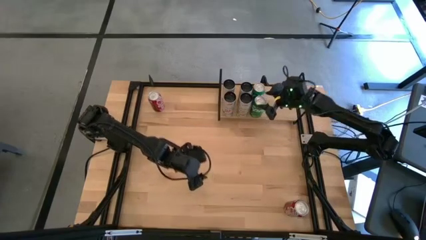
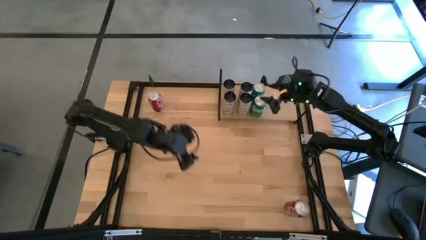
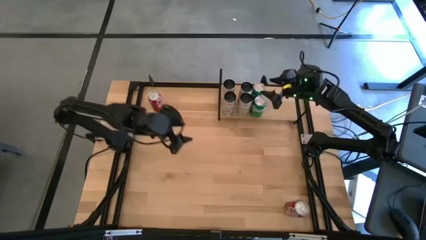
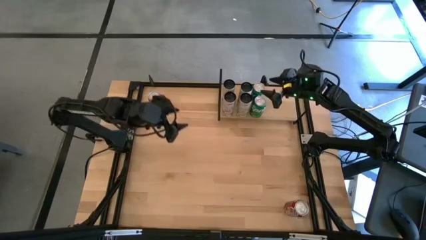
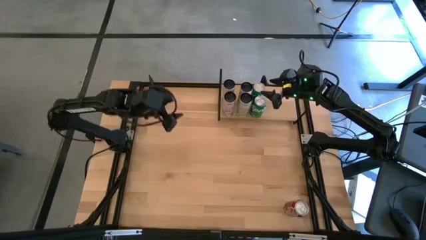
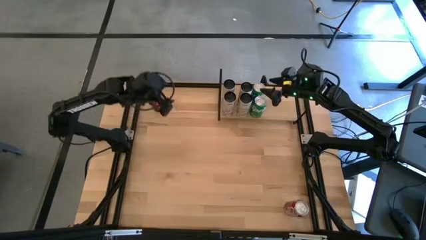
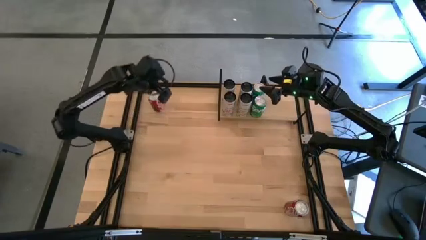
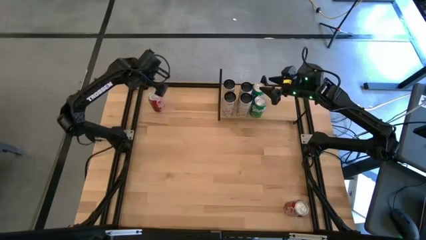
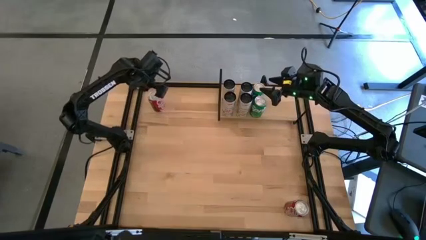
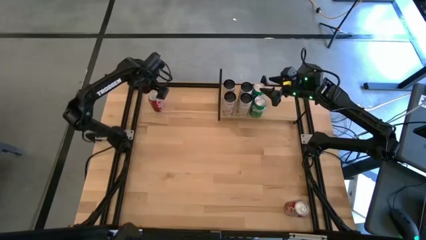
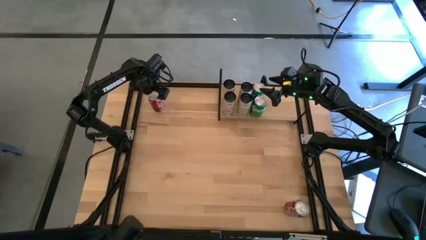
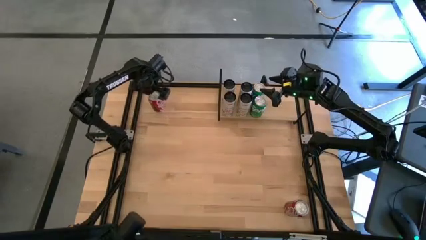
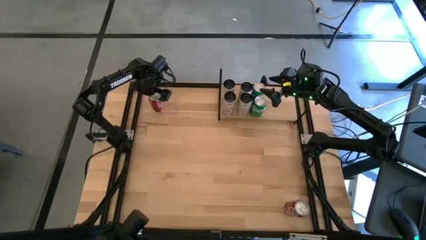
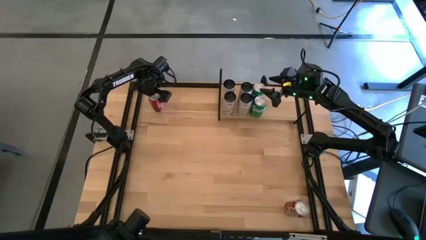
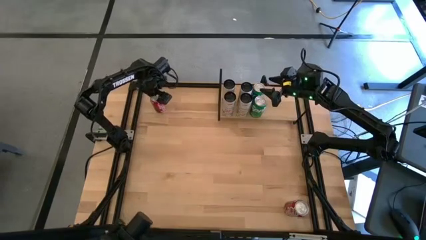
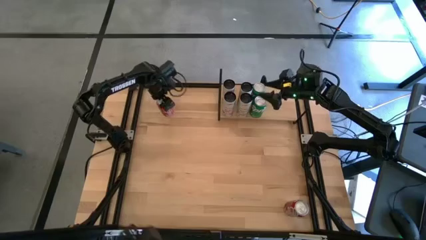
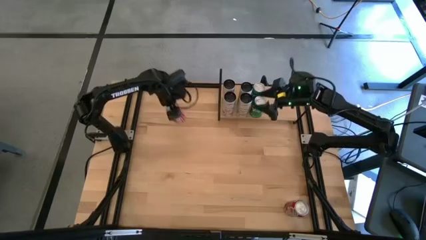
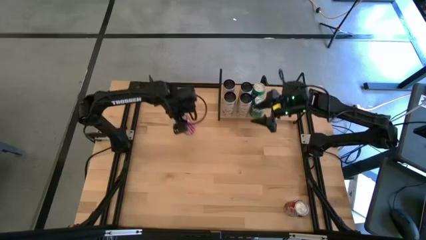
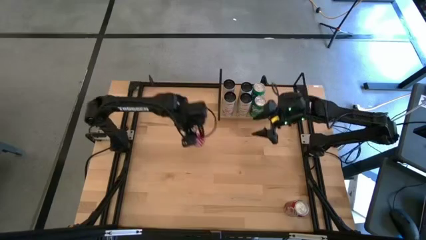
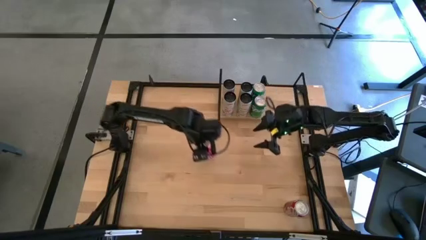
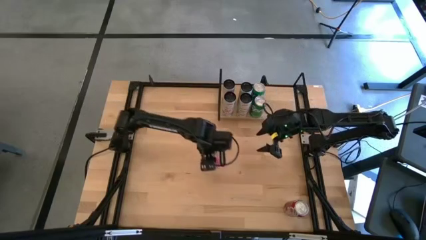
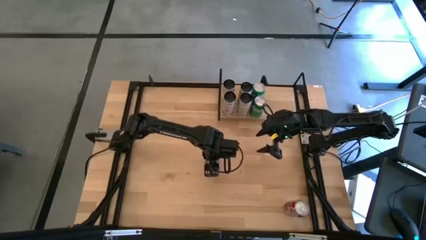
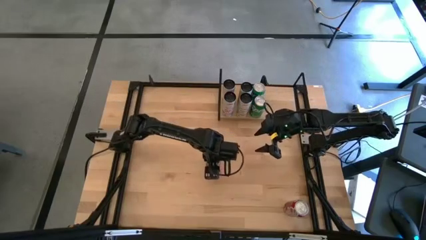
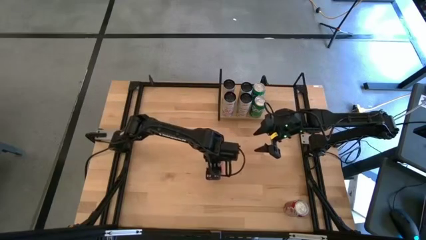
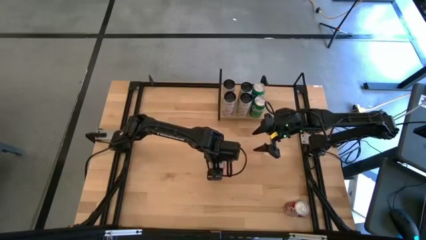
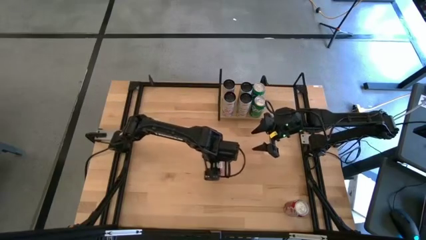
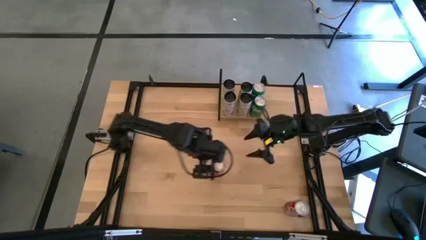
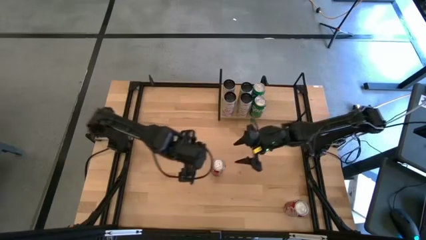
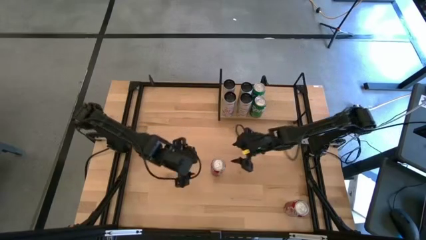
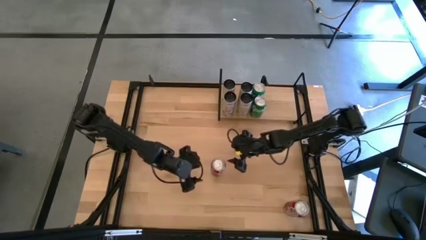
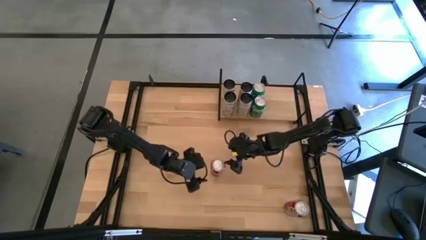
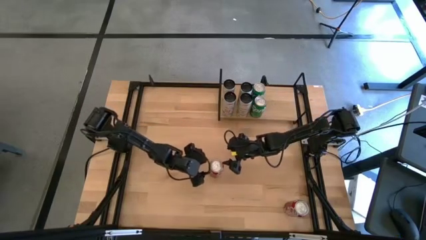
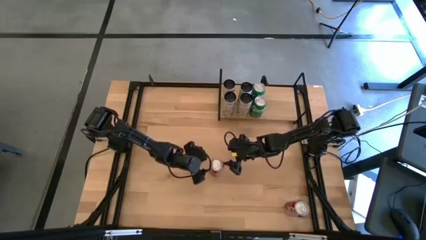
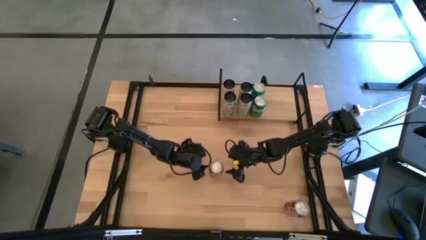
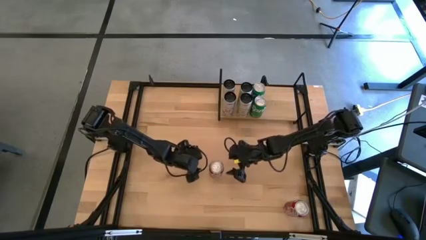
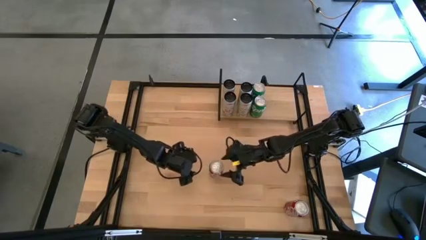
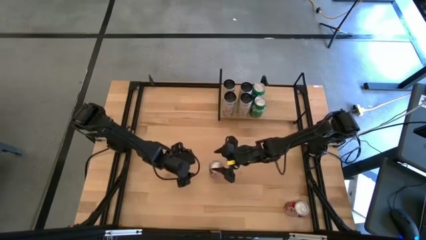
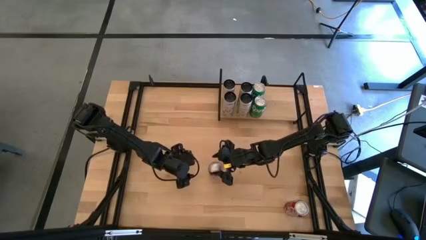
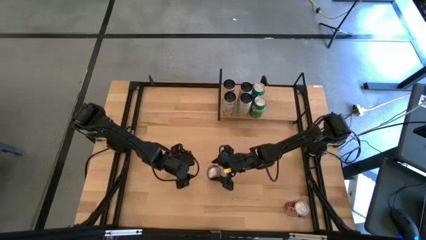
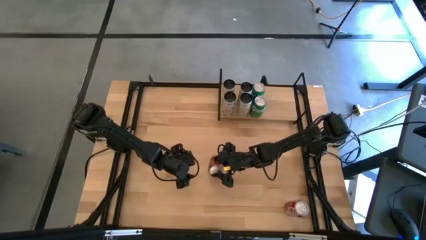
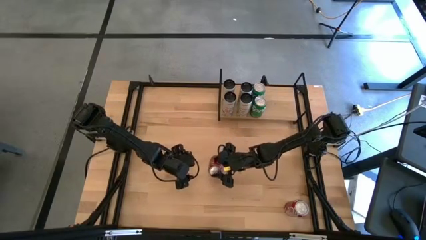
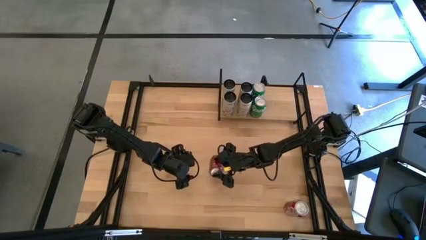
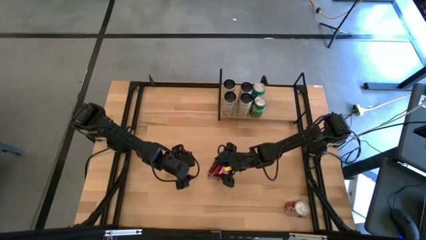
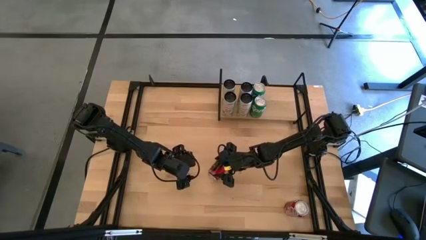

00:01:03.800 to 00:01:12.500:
Task: Place canned beverage on shelf
Put the top red-white soda can on the shelf

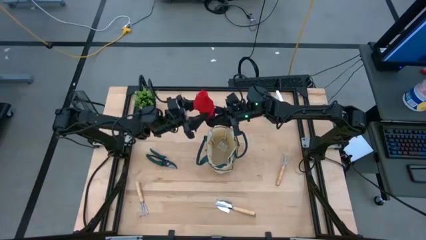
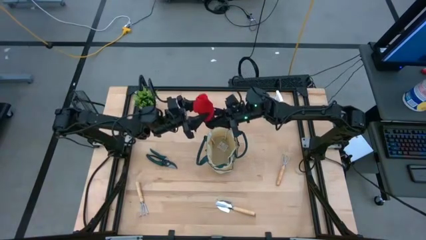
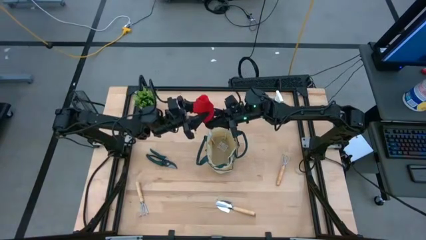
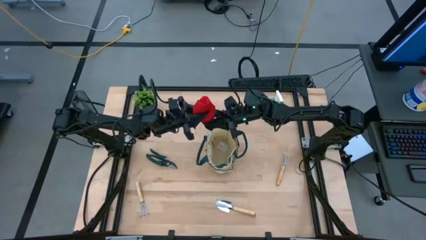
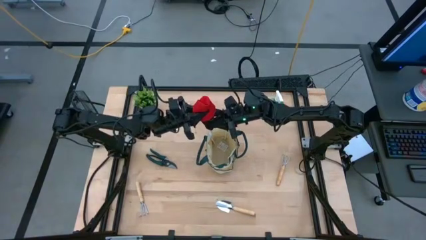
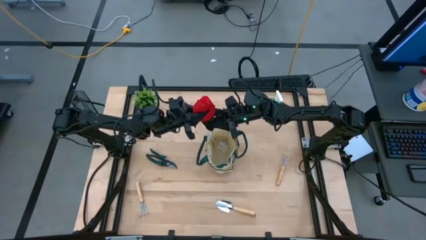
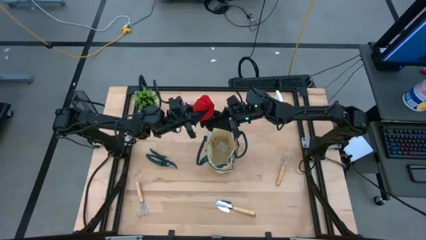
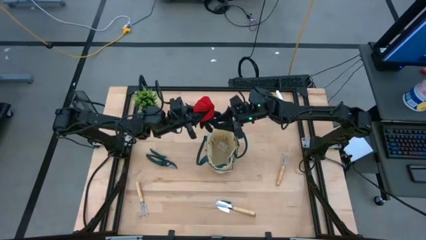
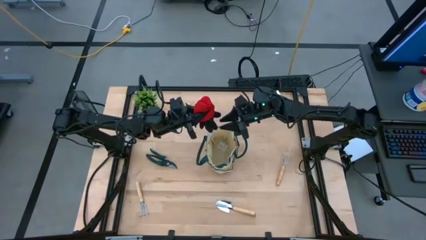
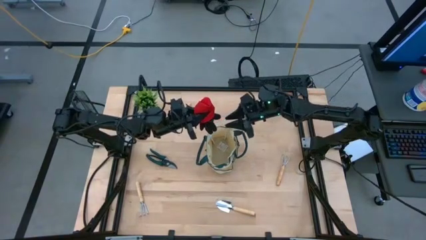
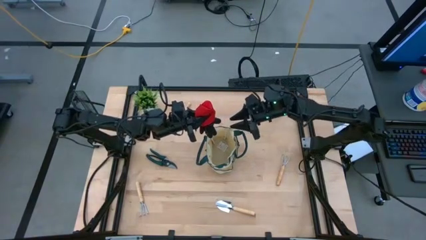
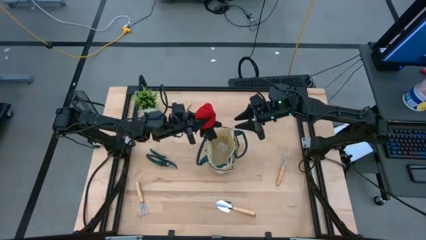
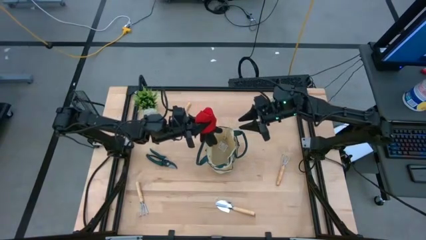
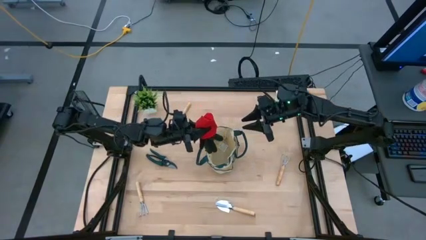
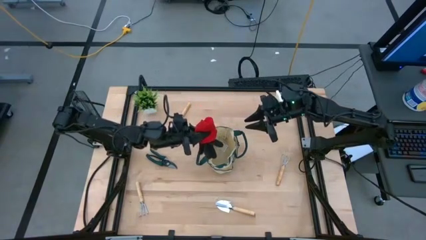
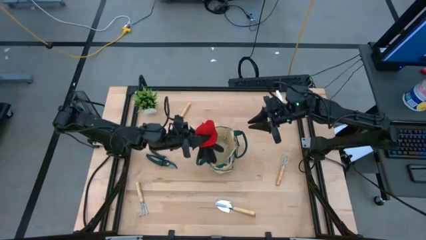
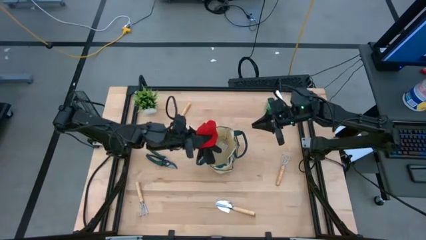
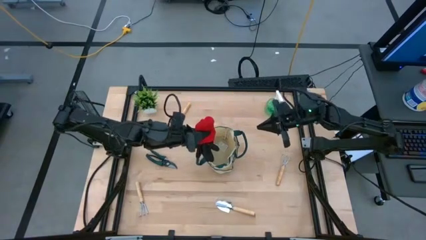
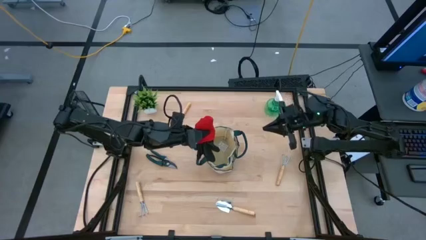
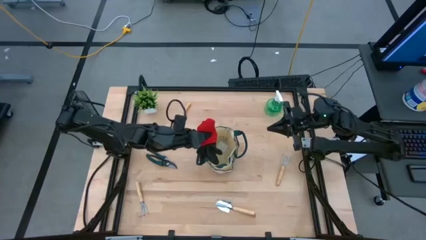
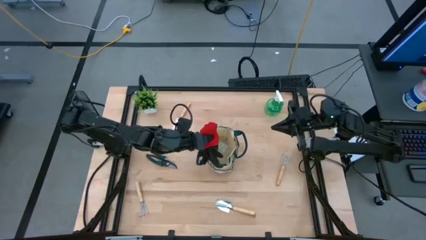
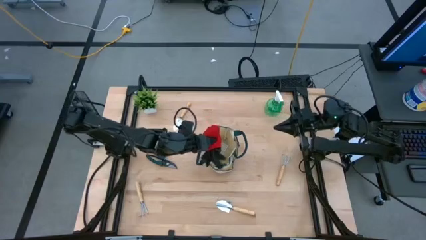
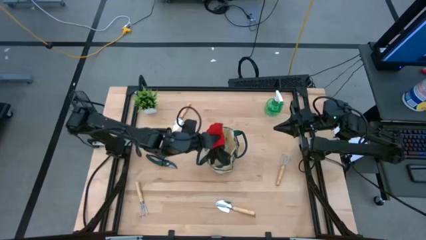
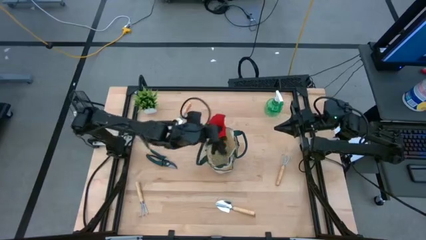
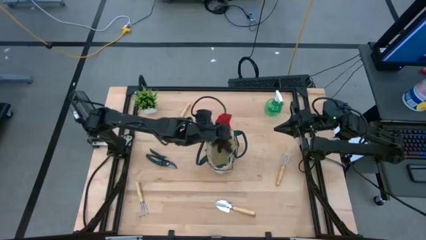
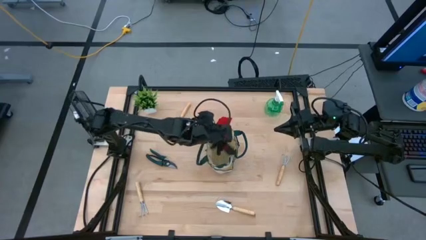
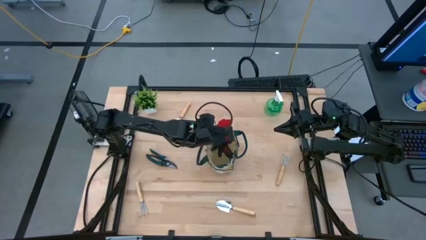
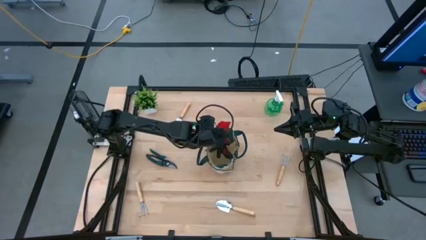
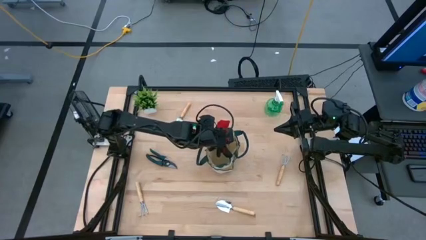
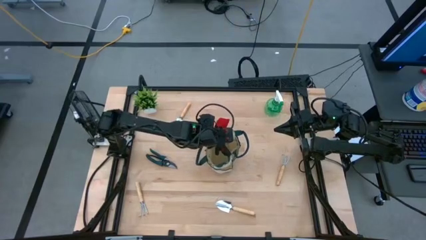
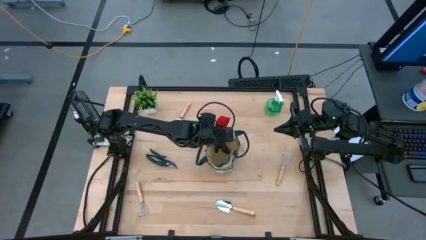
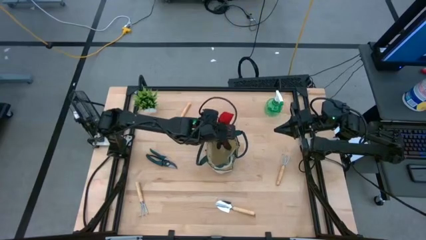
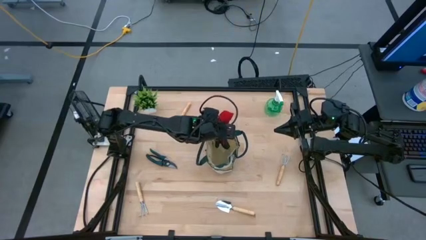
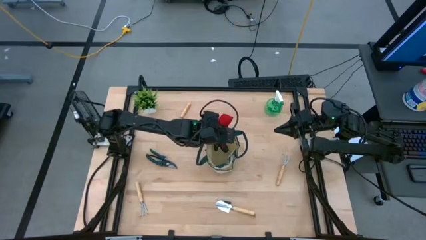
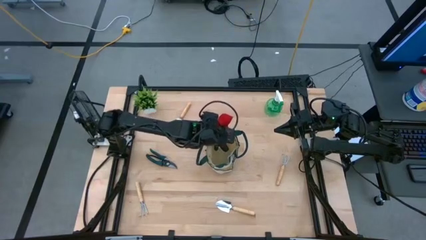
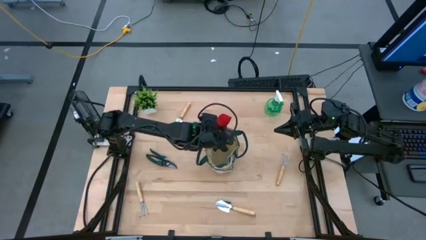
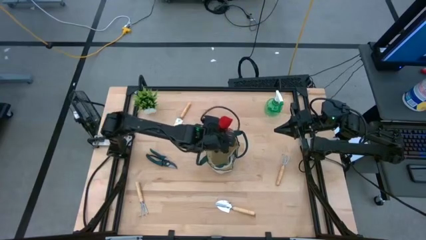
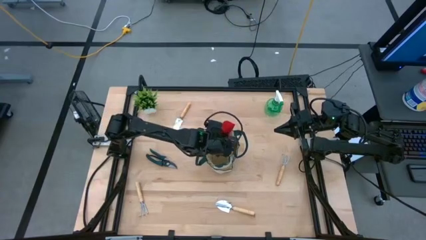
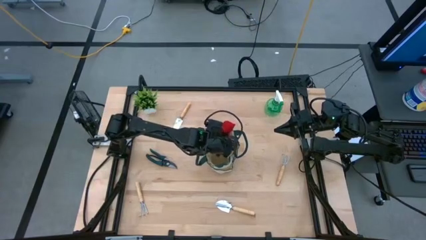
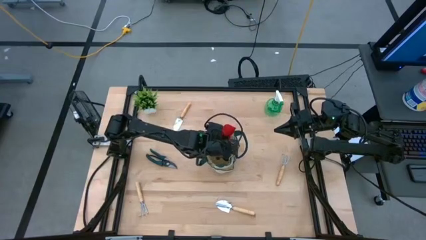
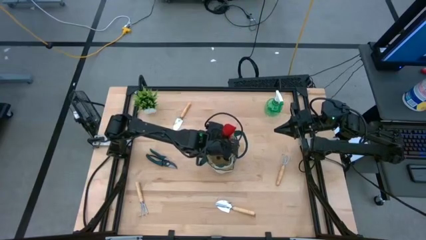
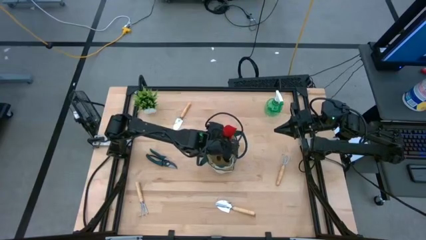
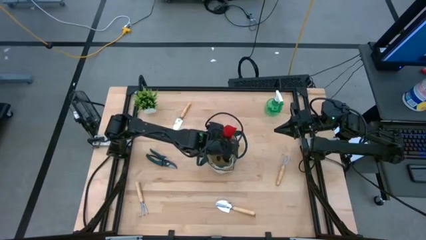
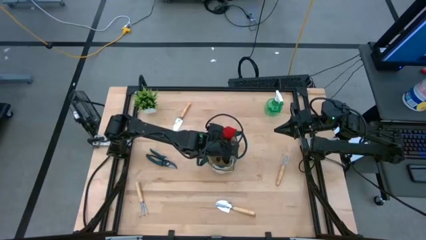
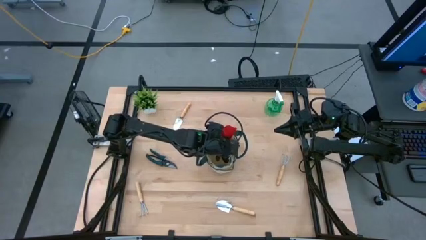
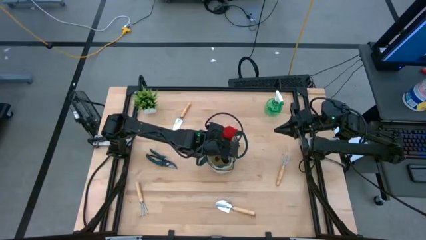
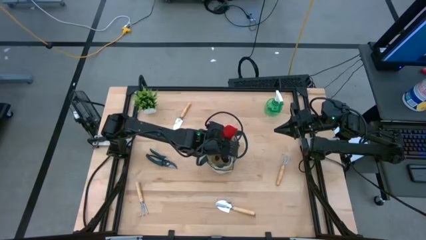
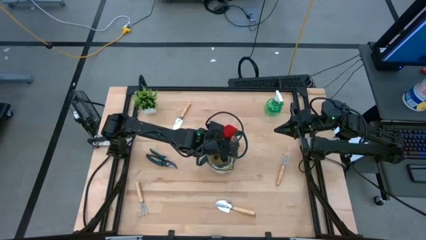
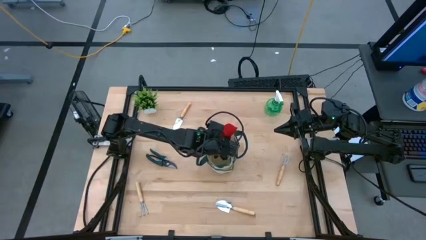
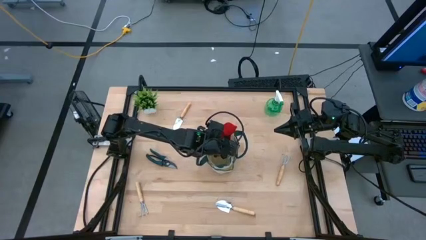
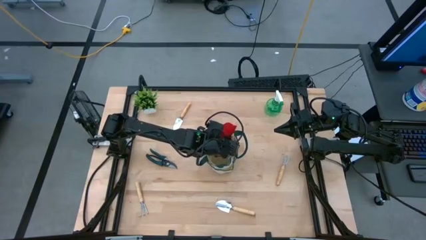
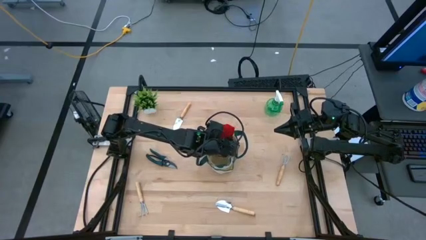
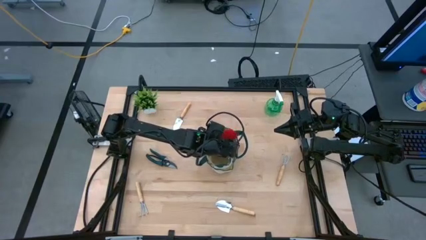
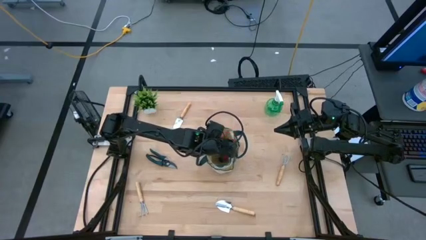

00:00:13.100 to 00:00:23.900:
Task: Pick & Place Garden tools in Gardening bag
Put the red gloves into the light brown gardening bag
